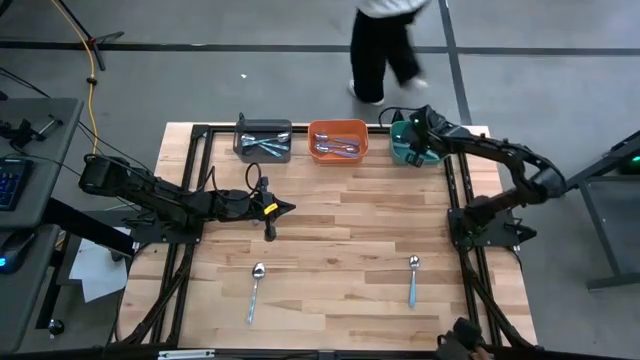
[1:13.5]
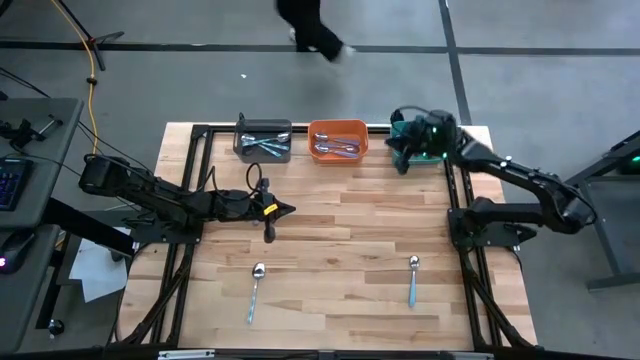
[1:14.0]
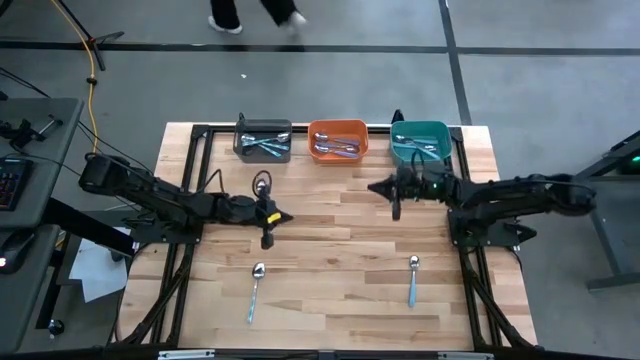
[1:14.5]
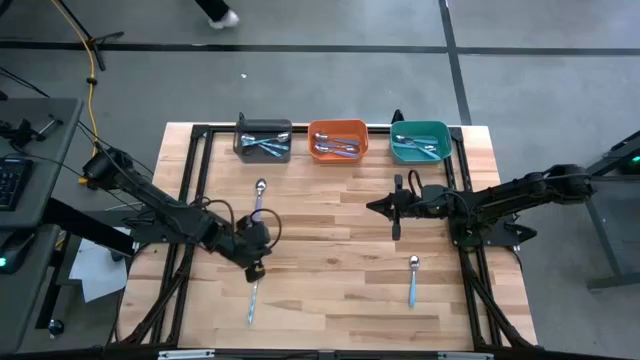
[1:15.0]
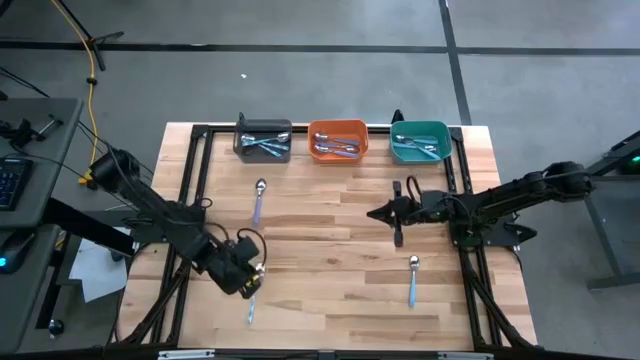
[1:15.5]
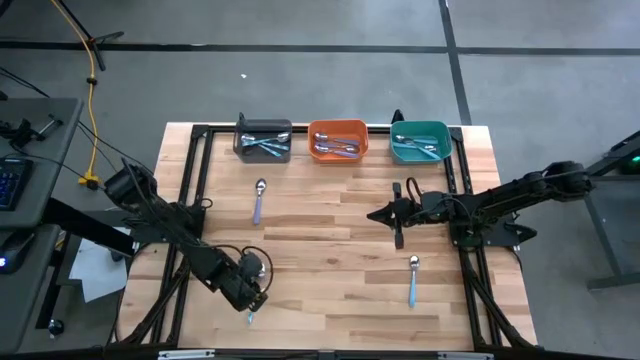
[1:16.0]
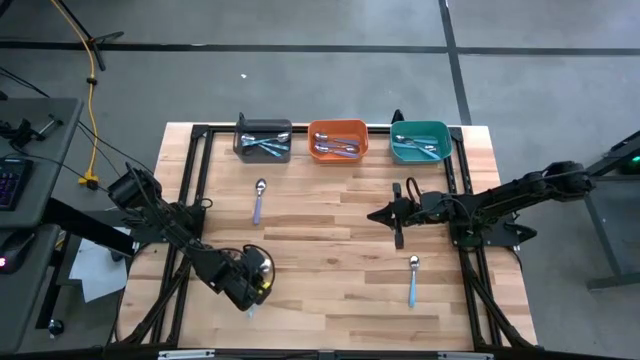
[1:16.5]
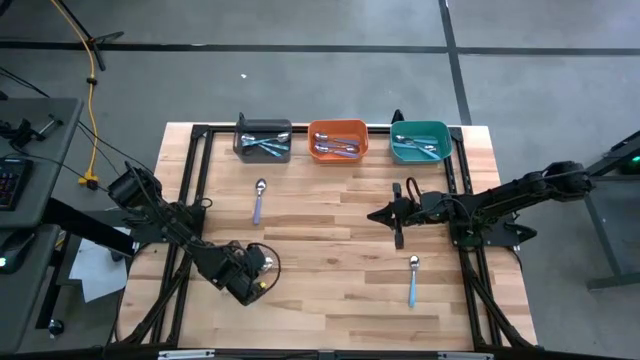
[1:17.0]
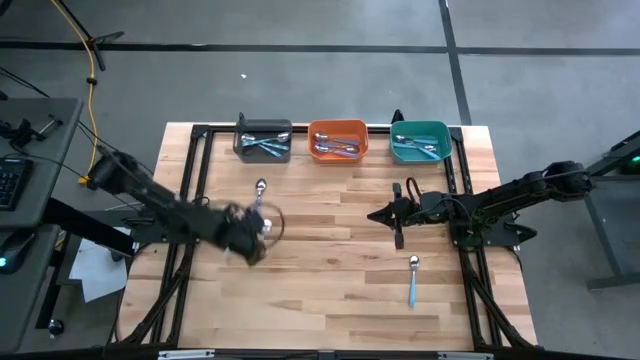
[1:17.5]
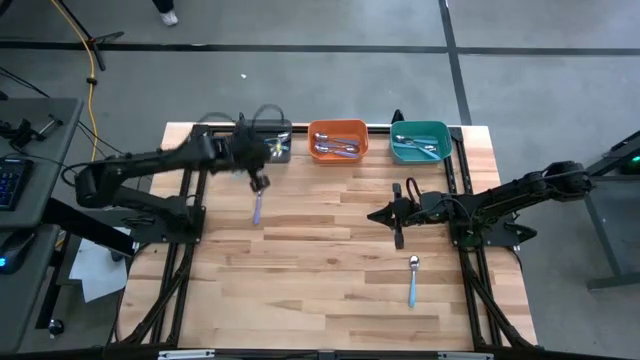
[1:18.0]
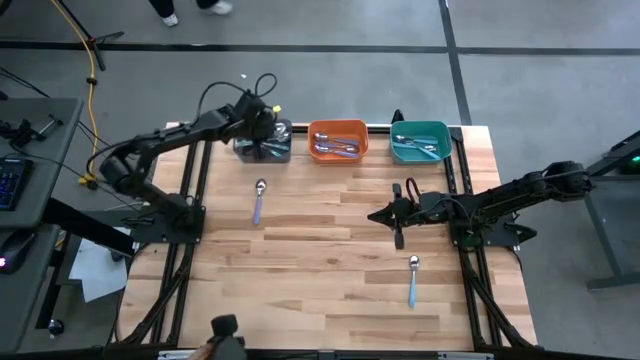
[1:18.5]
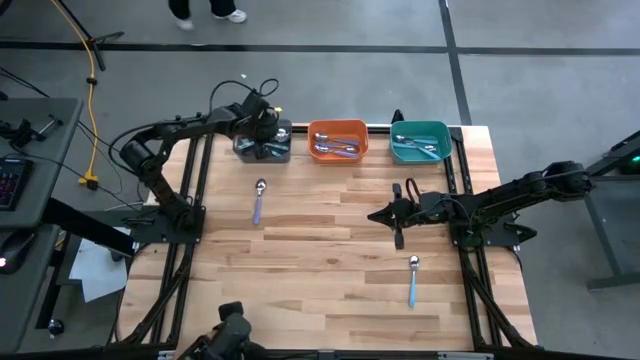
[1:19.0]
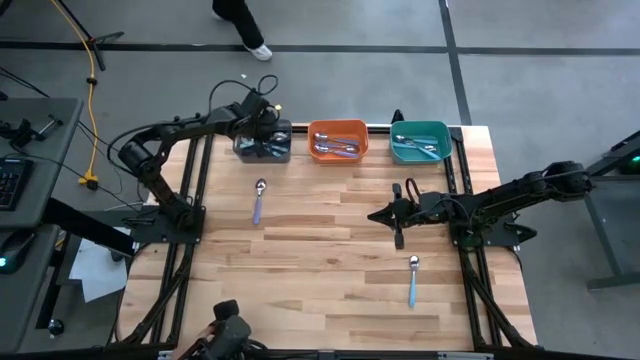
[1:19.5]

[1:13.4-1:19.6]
Task: Sort silverware by color (type)
Put the blue patterned spoon into the black bin

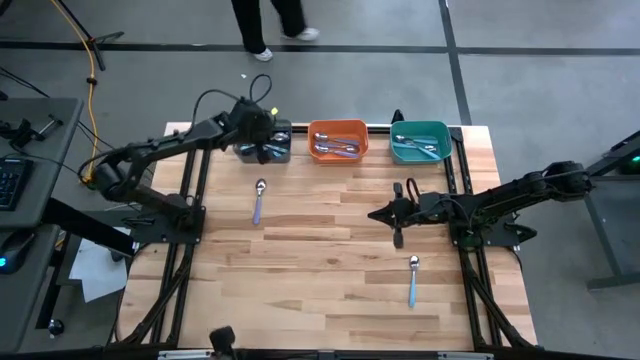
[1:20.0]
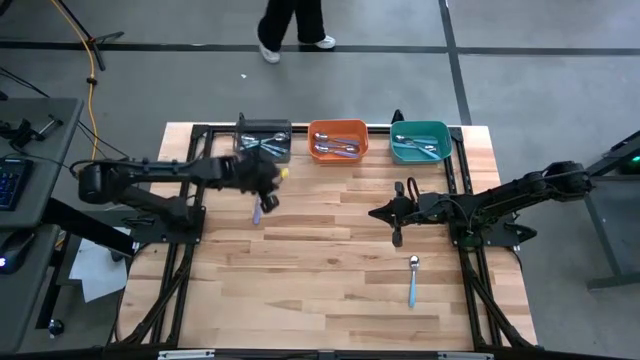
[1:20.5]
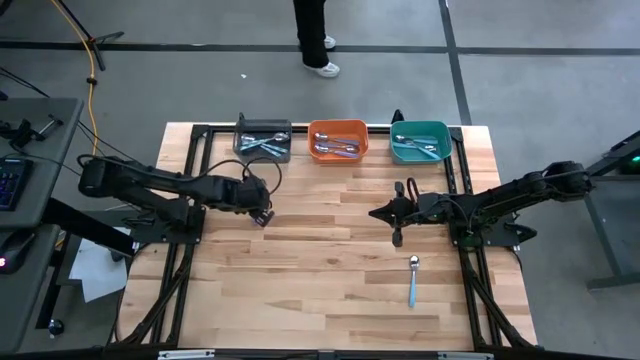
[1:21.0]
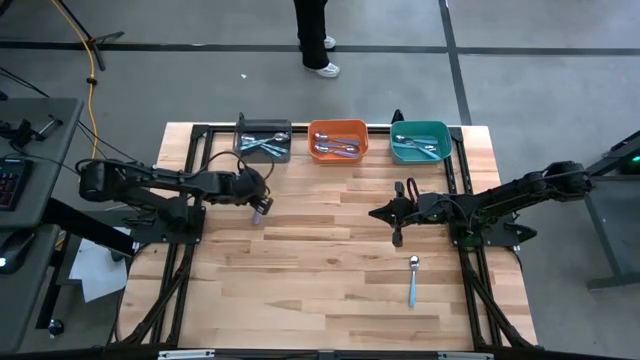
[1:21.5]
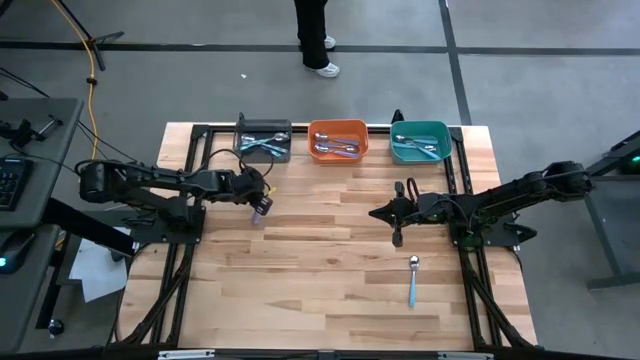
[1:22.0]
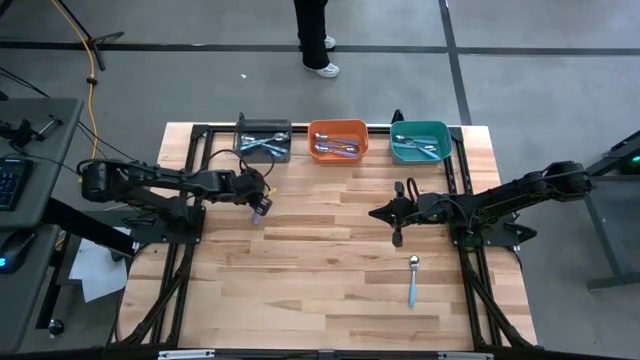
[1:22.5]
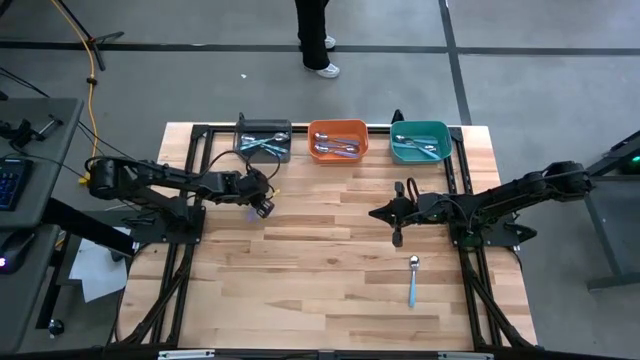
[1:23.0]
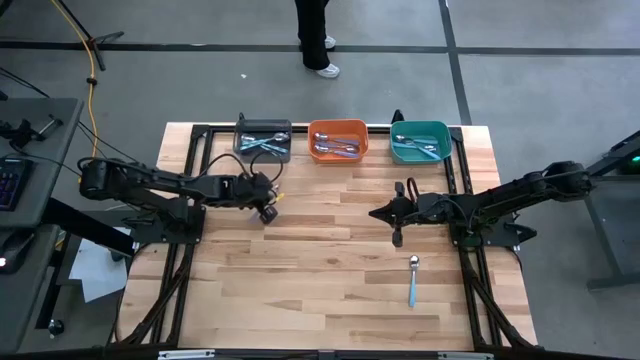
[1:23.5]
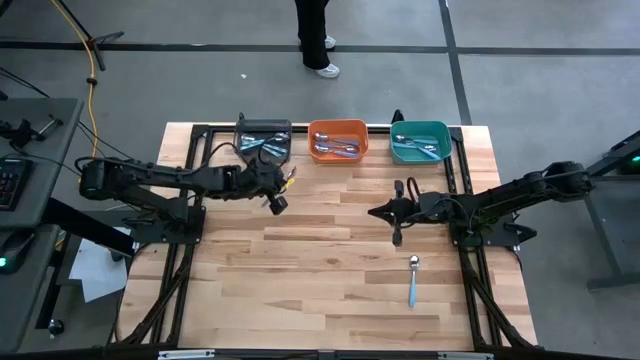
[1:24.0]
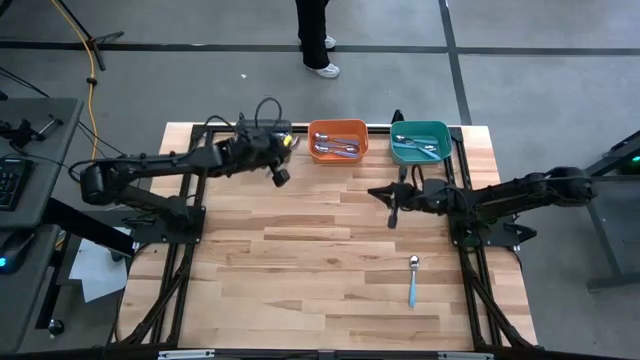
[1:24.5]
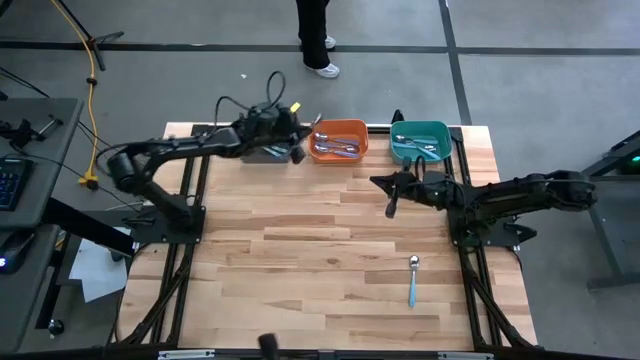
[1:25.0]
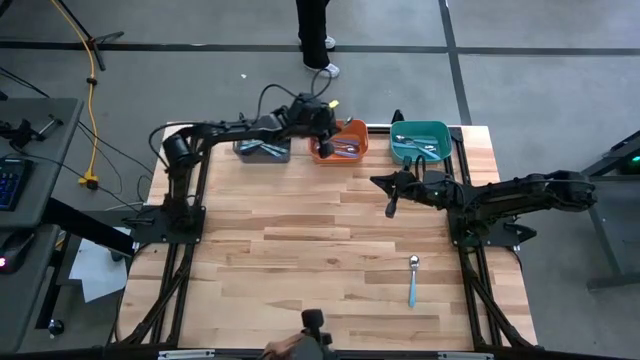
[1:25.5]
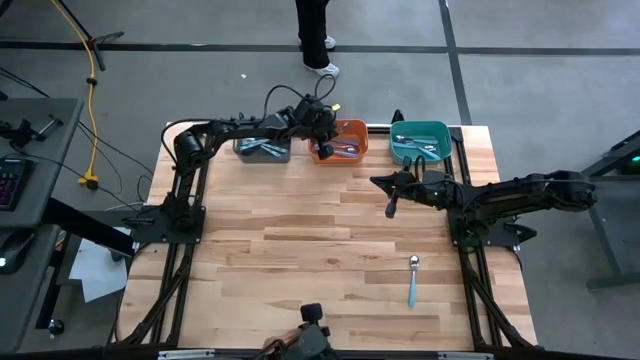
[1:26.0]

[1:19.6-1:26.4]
Put the purple spoon into the orange bin

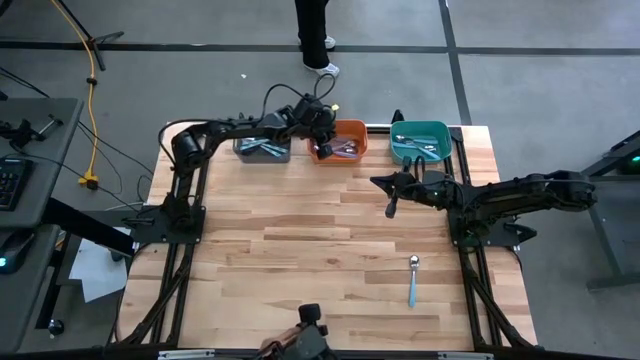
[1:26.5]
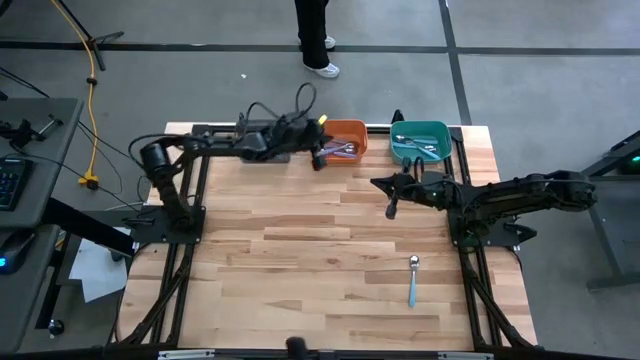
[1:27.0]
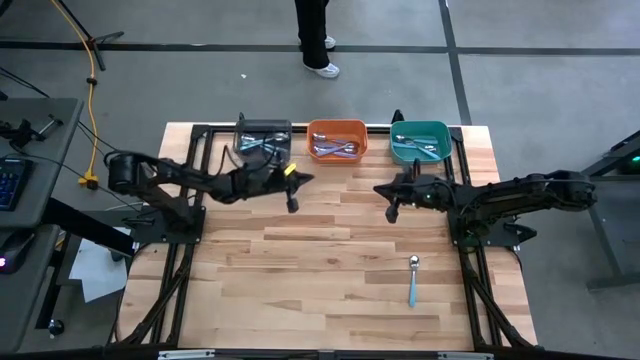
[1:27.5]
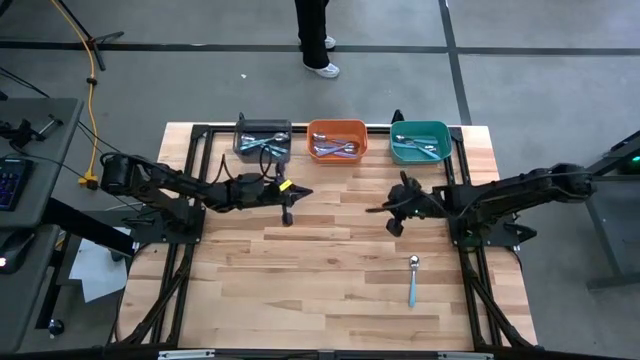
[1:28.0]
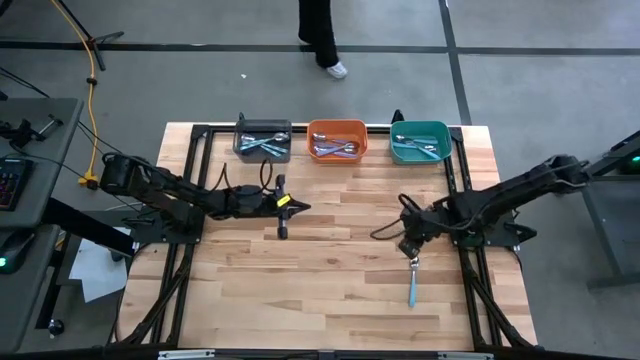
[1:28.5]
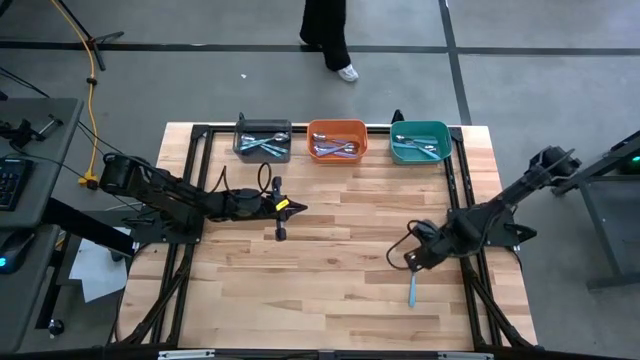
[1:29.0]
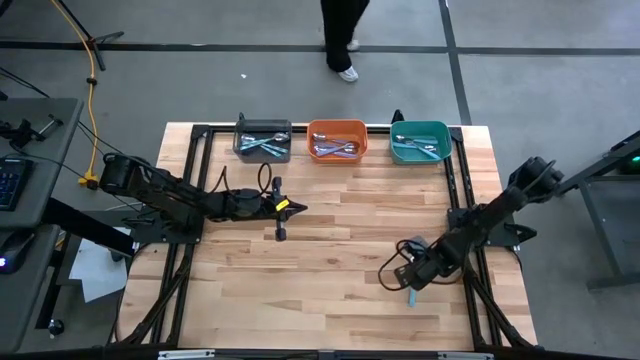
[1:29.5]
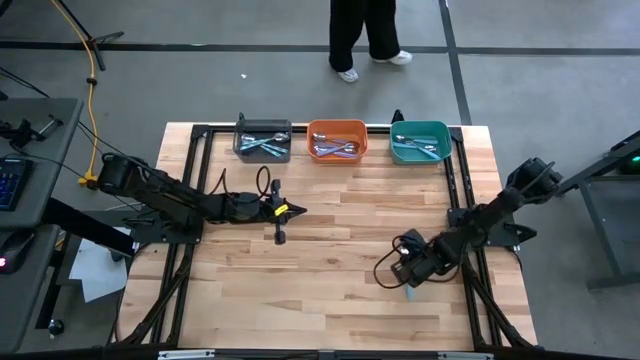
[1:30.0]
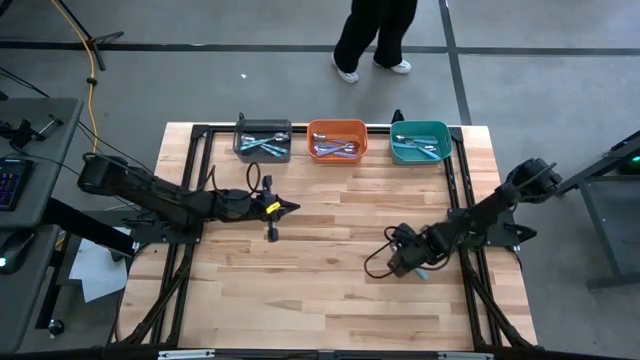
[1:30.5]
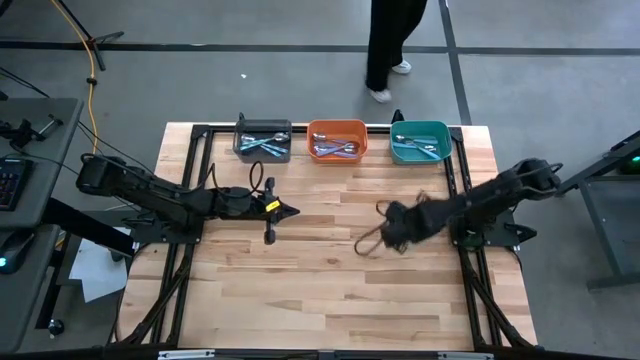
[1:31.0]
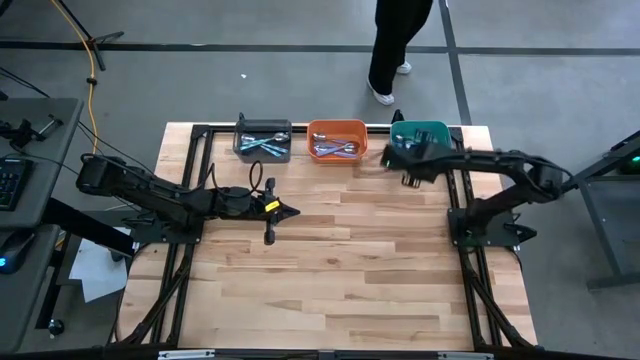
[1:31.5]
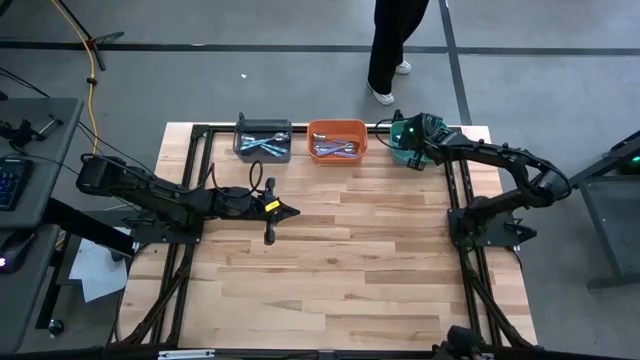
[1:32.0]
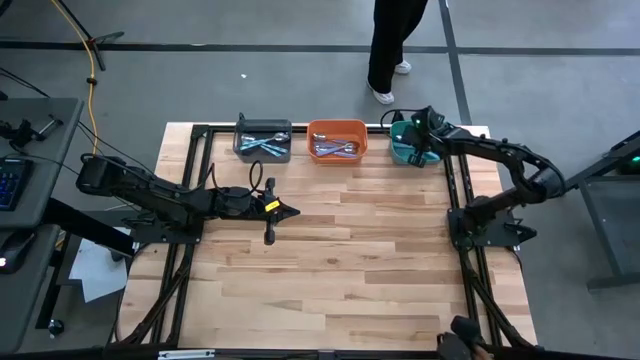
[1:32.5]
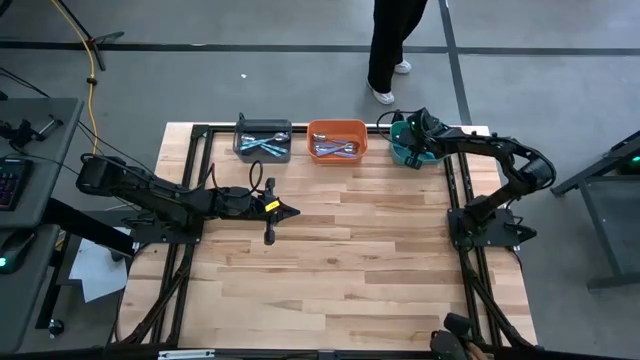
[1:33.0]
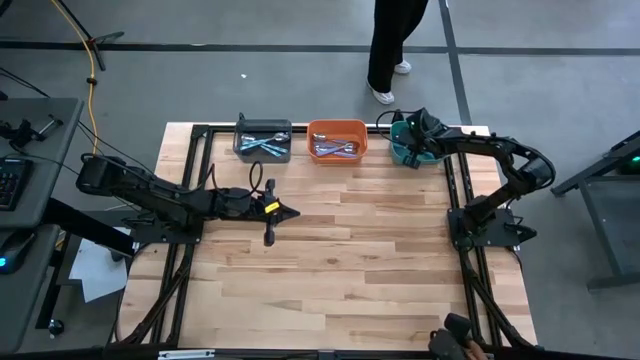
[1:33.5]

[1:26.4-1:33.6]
Put the blue spoon into the green bin

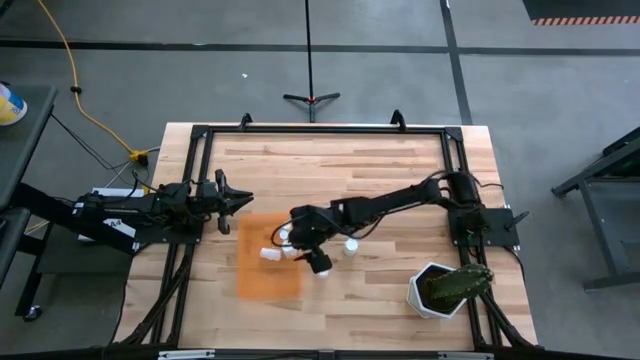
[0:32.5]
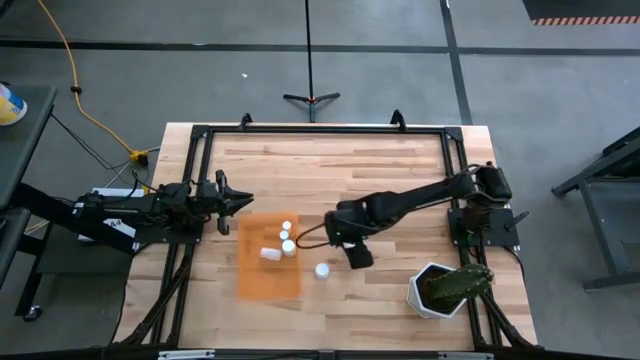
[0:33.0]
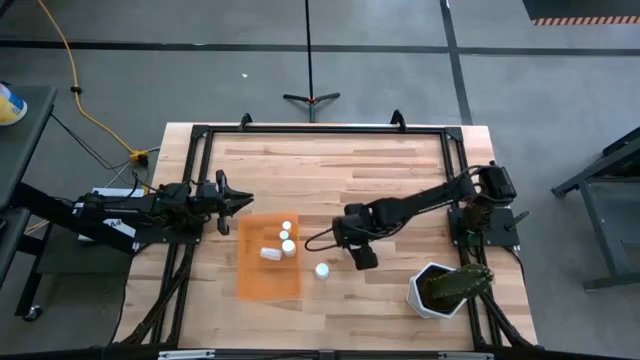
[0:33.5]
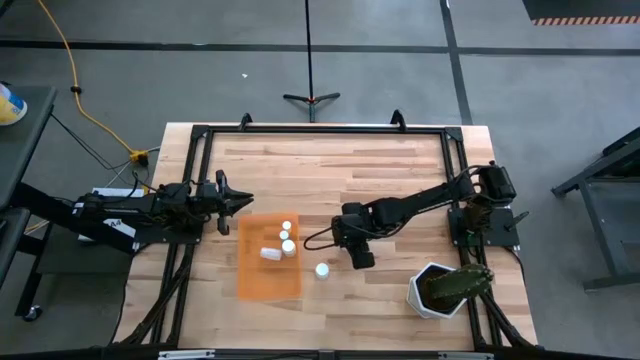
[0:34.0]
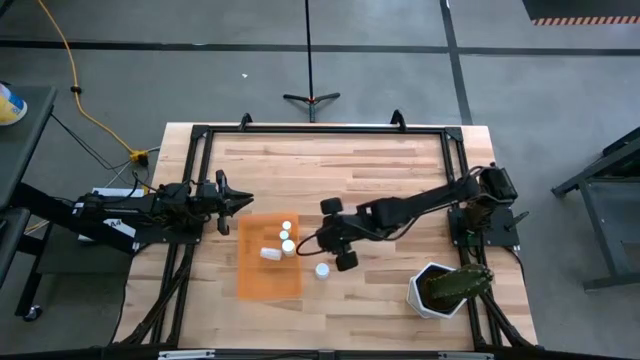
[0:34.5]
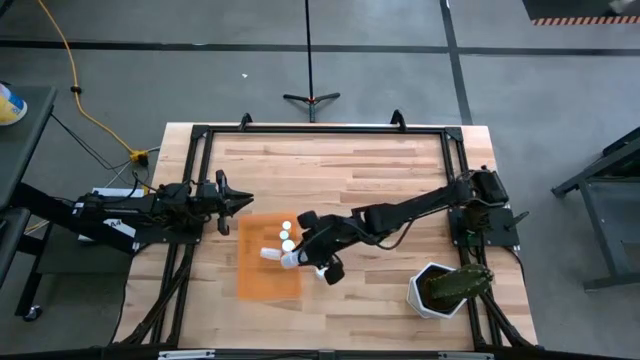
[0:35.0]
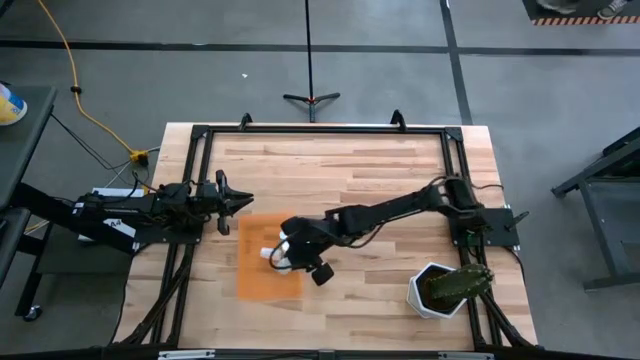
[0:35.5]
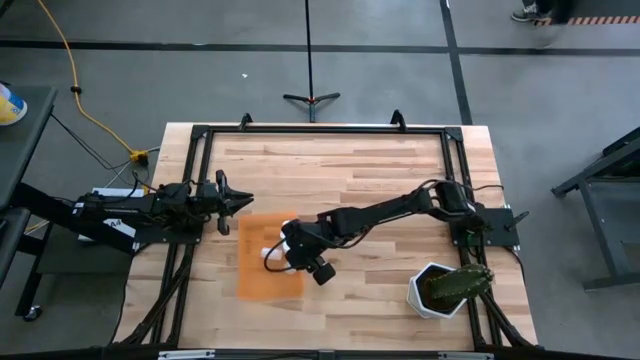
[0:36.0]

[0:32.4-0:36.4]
Task: Pick and place pill bottles into a basket
Put the top white pill bottle into the orange bin
